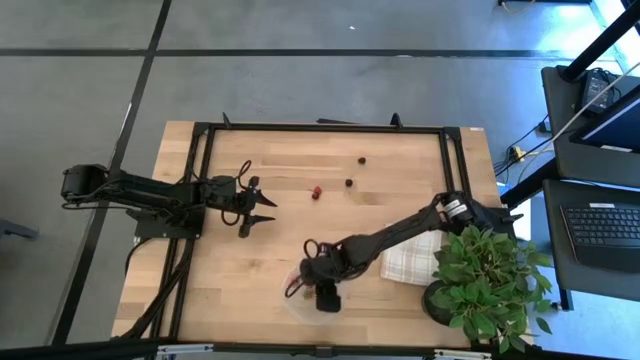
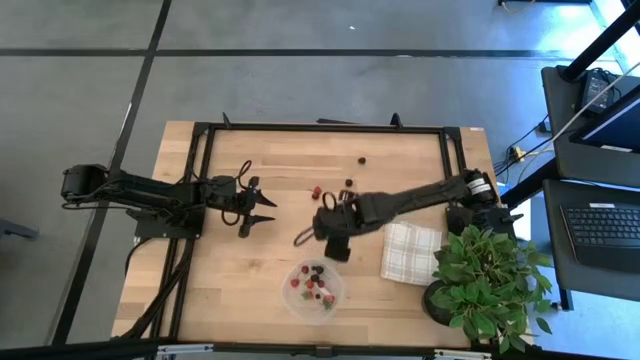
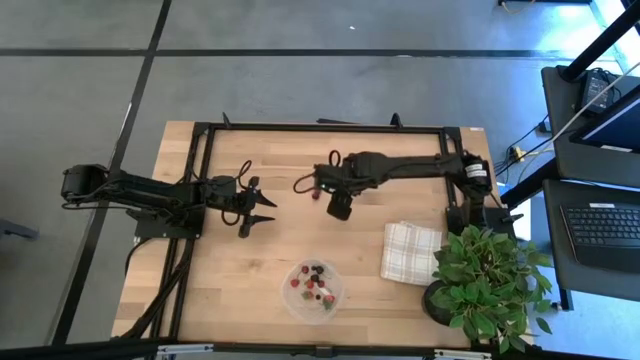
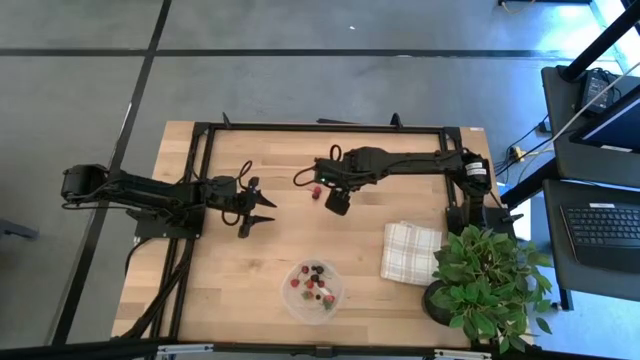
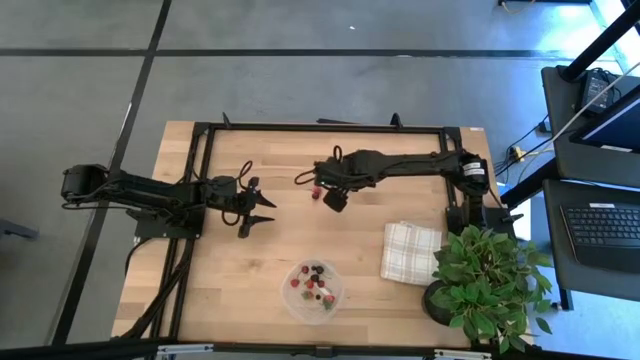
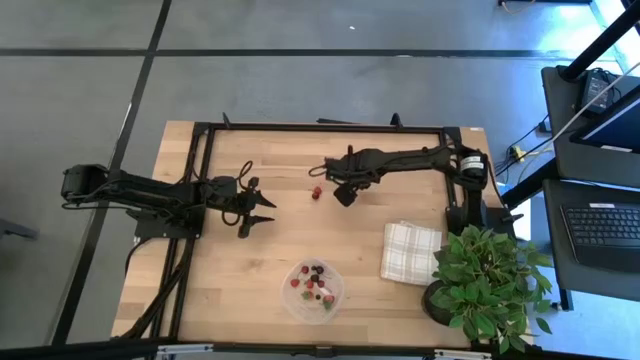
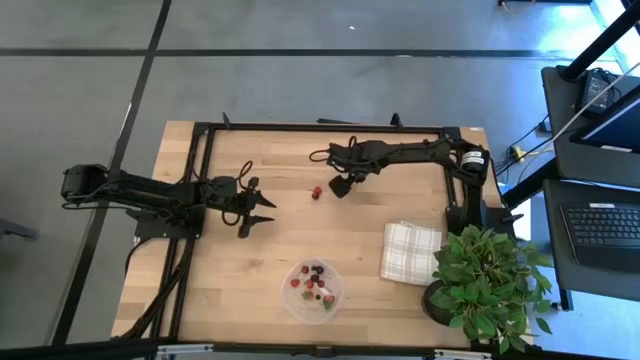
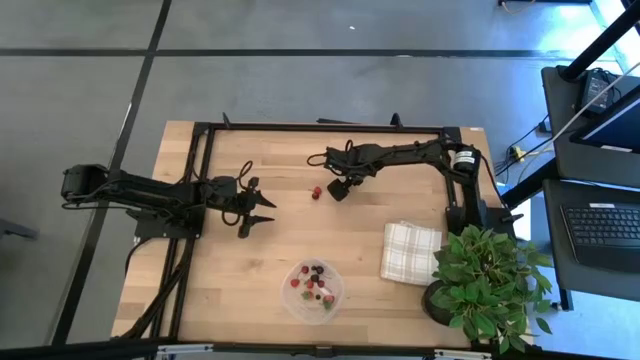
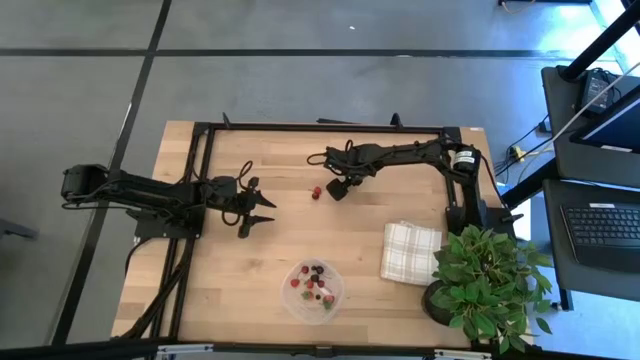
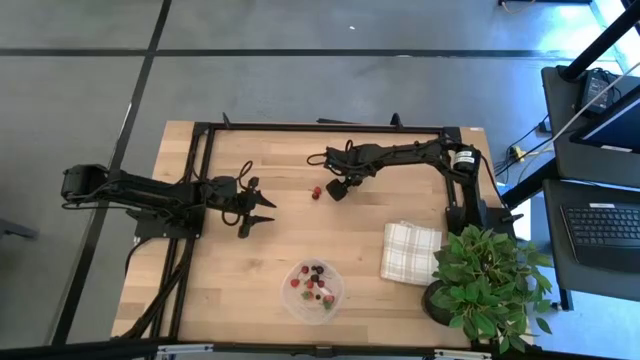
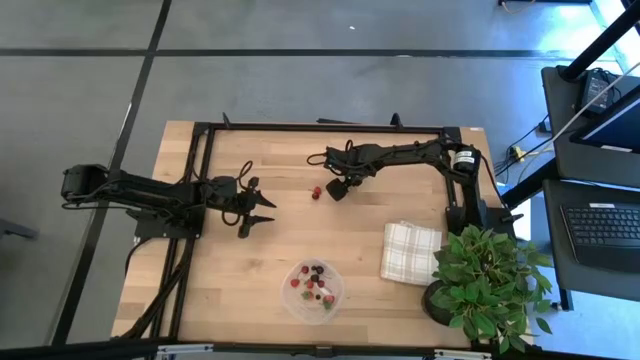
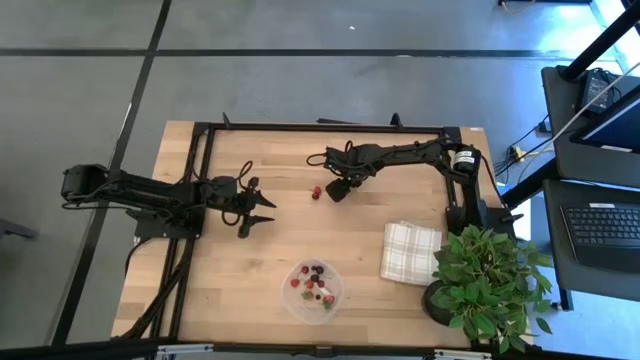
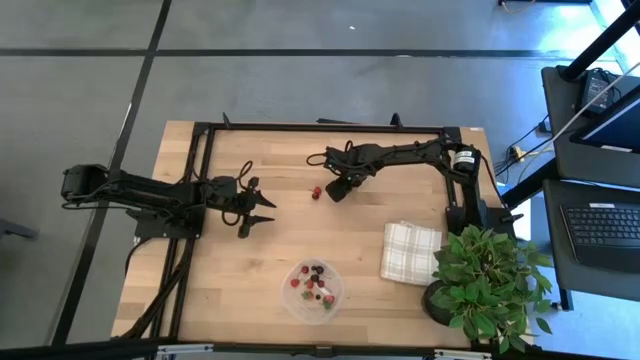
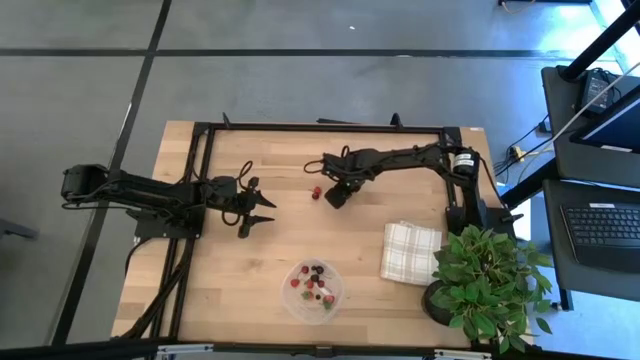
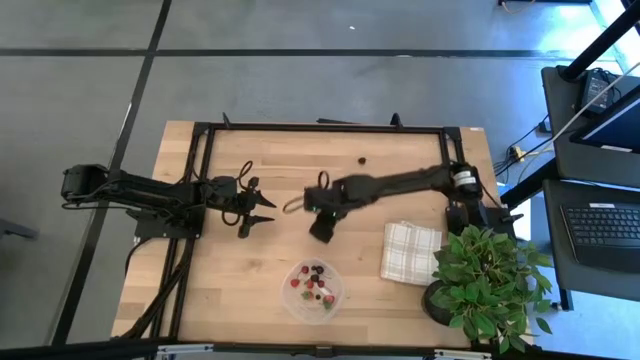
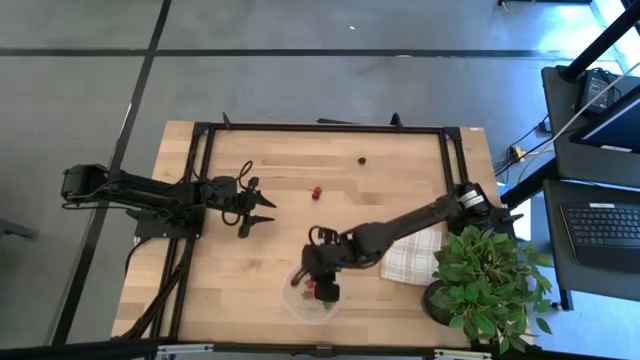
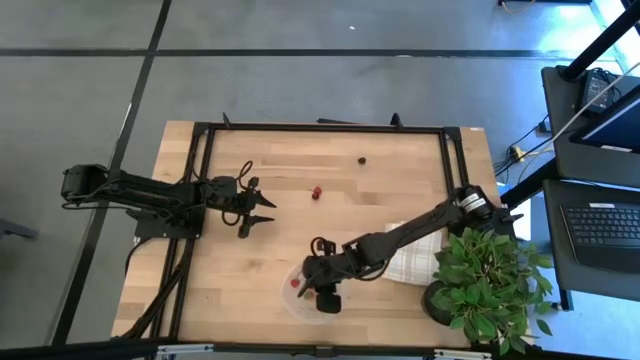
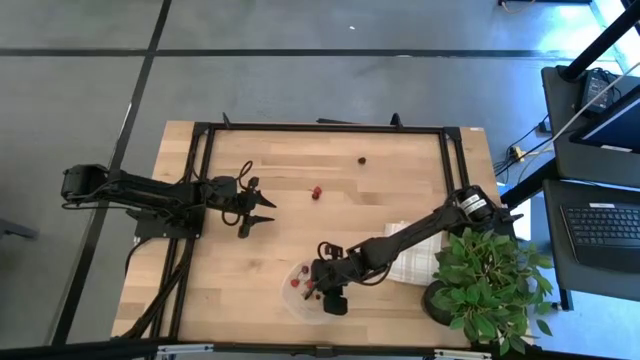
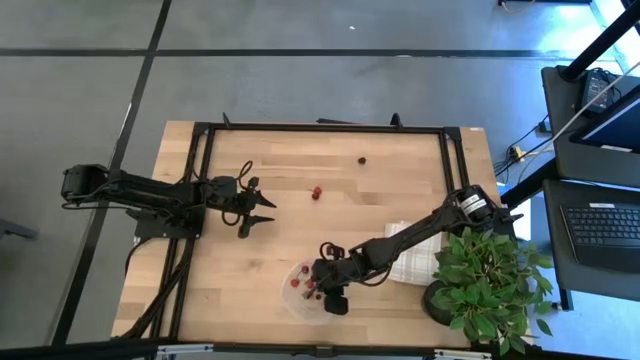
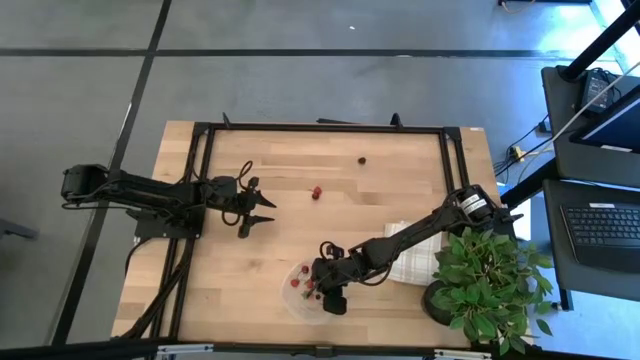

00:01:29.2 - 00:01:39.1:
Task: Pick and placing Produce into tupperware
Put the black cherry in the bottom transparent bin

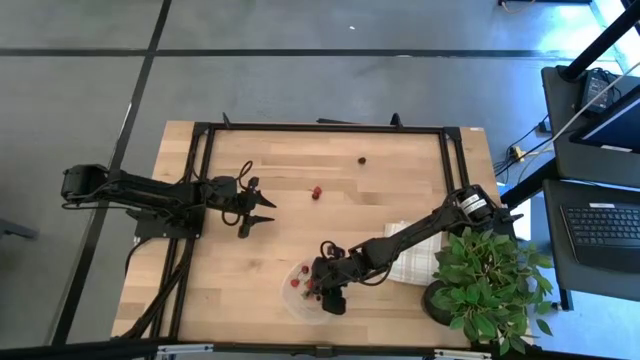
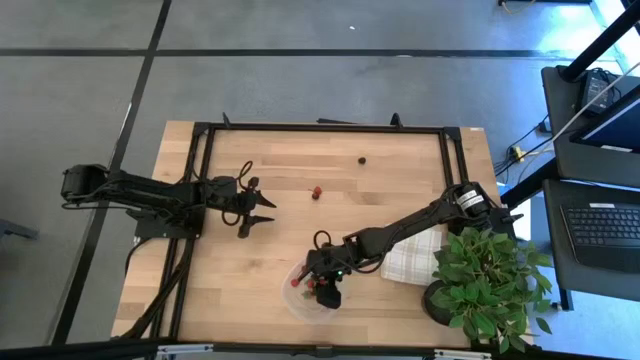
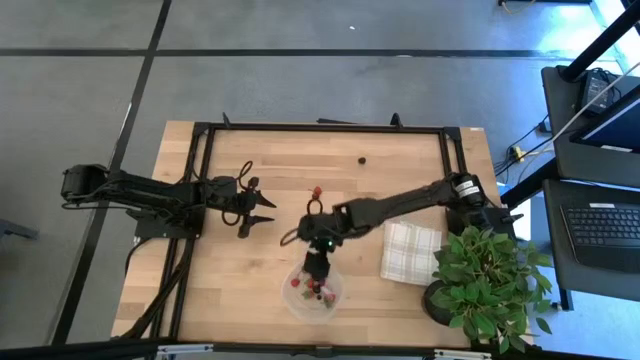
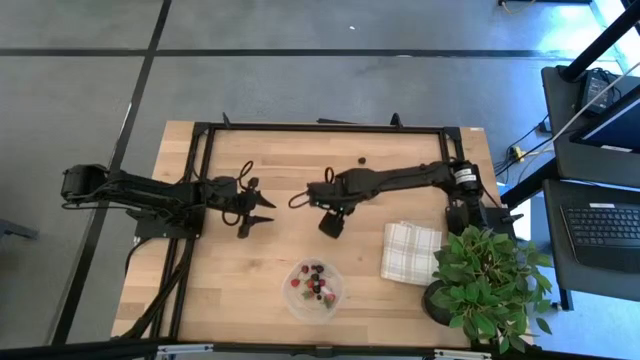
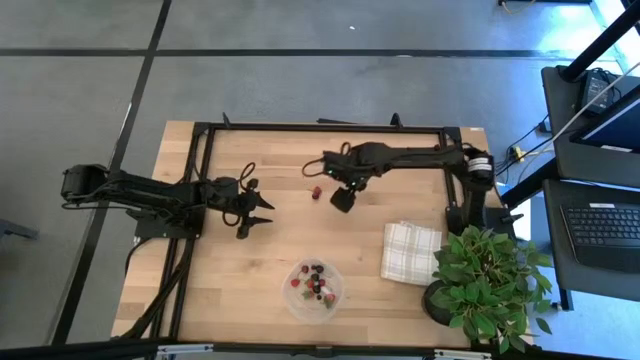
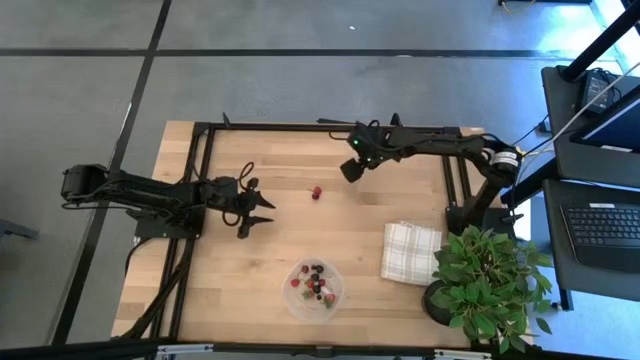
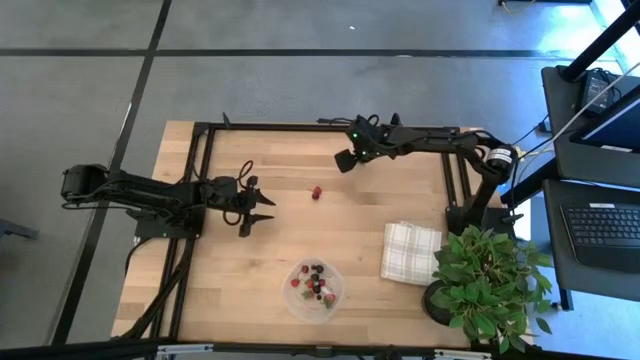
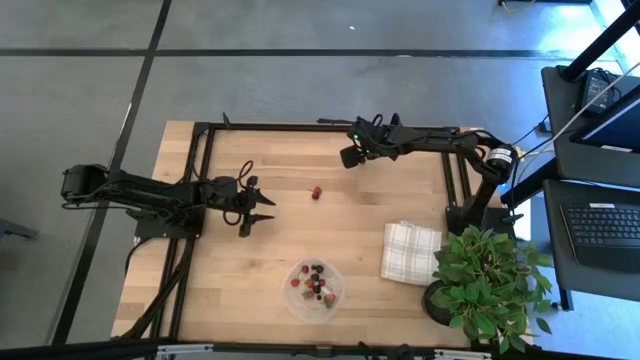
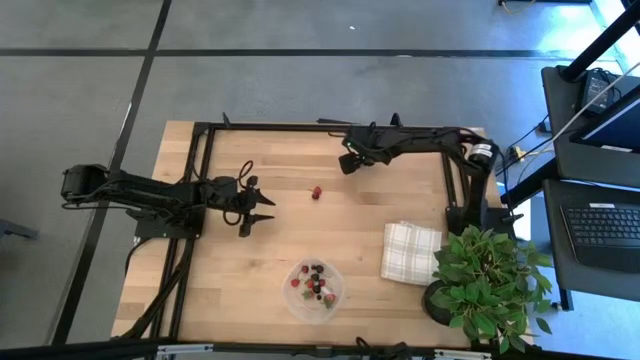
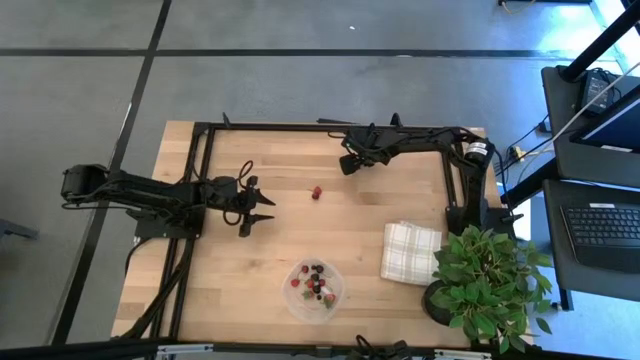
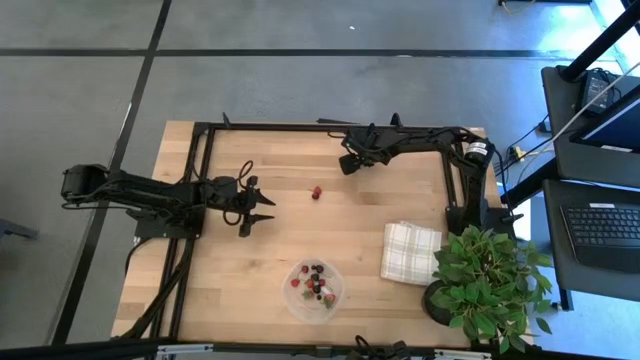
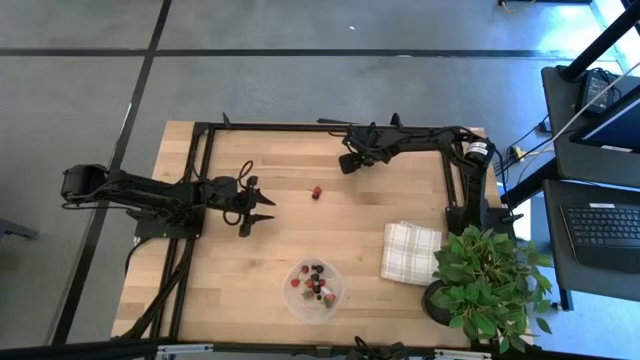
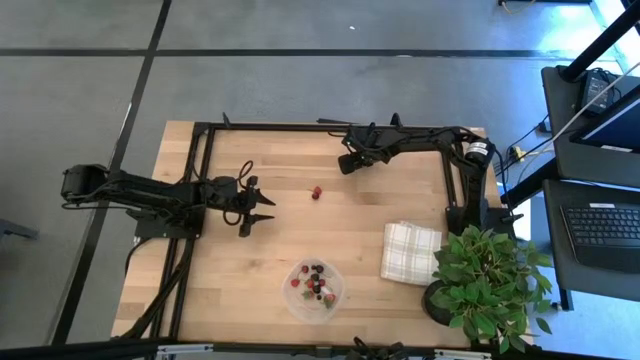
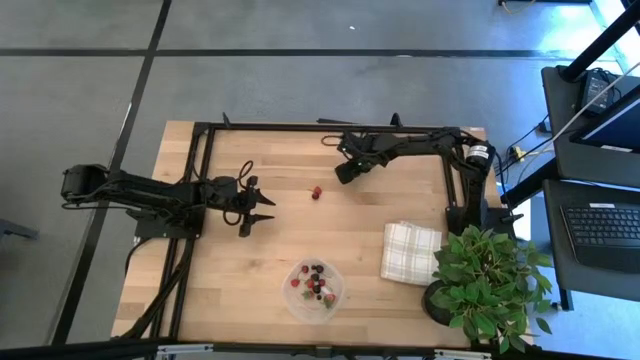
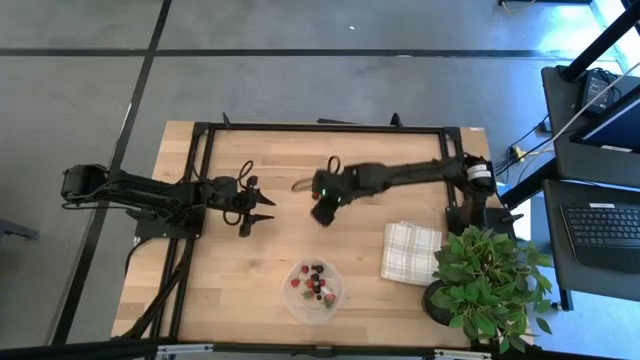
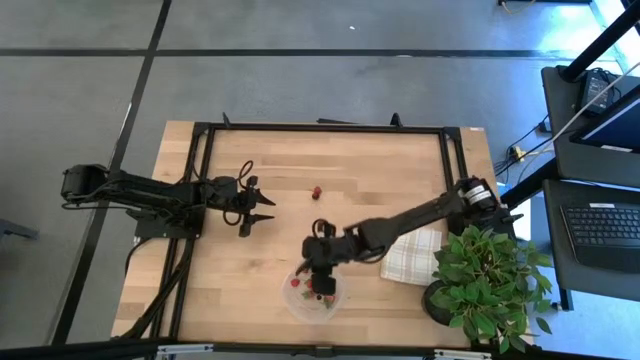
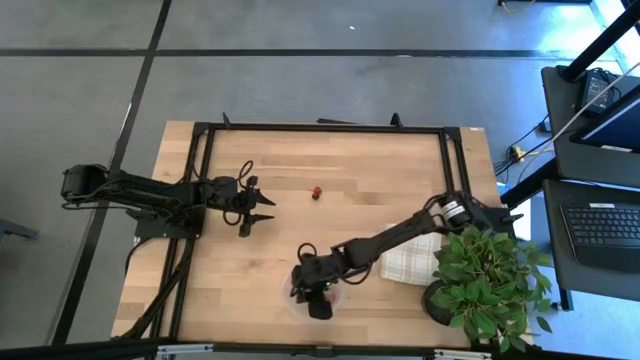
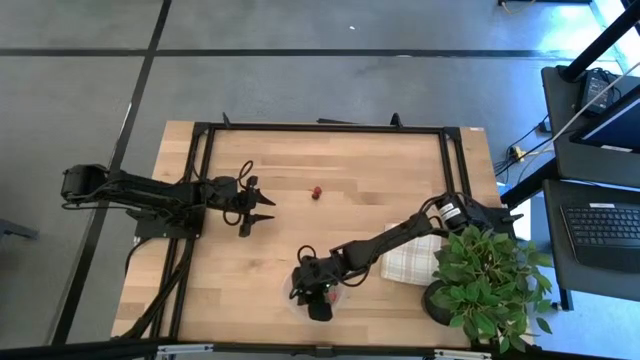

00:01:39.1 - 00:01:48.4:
Put the blackberry in the bottom transparent bin

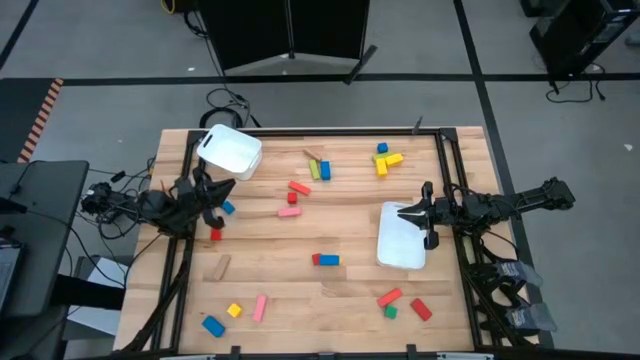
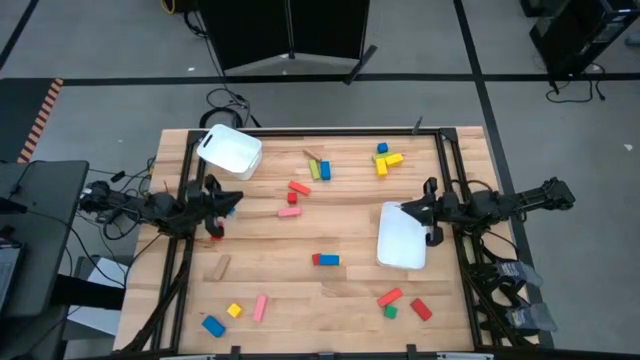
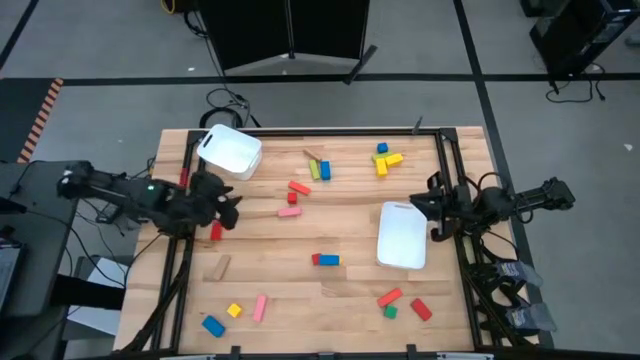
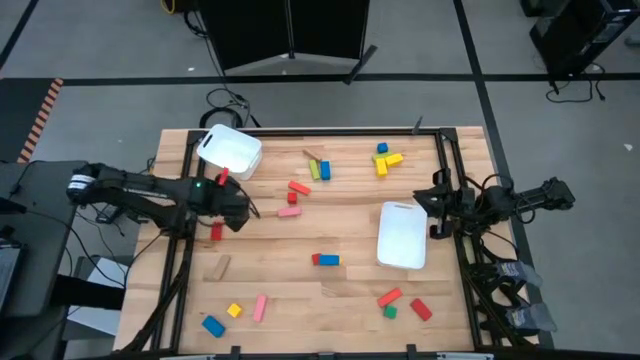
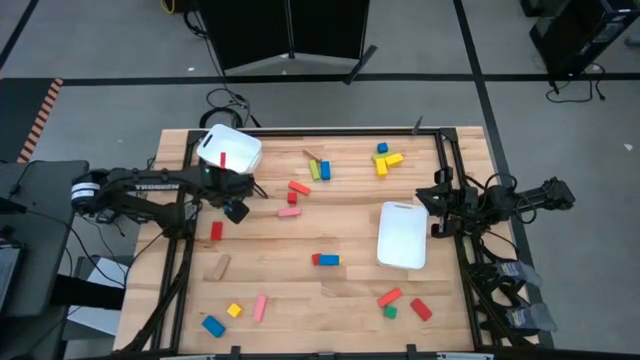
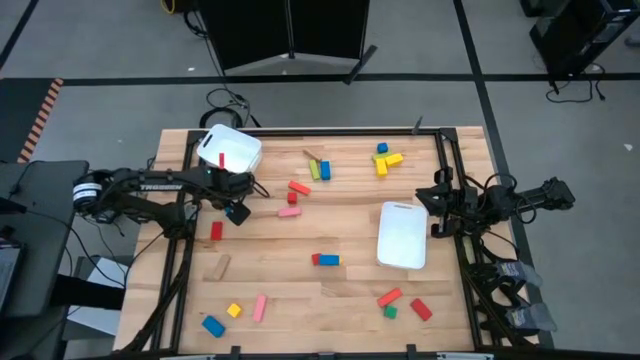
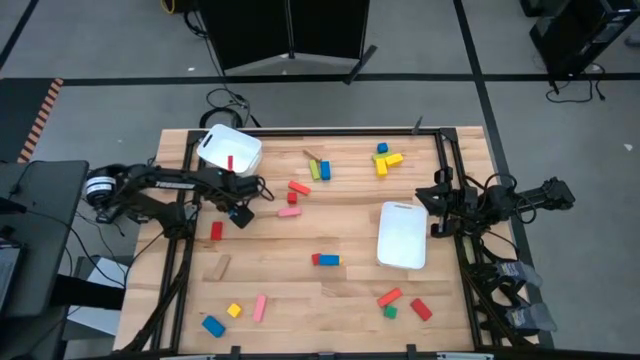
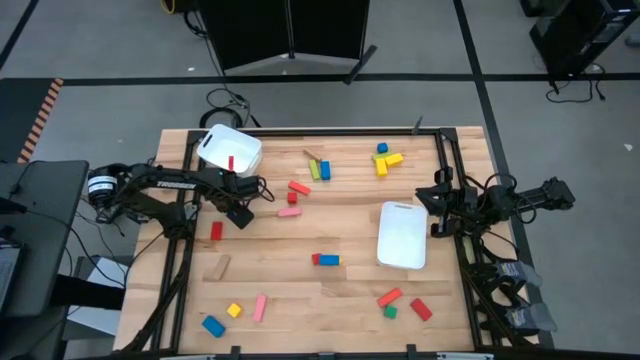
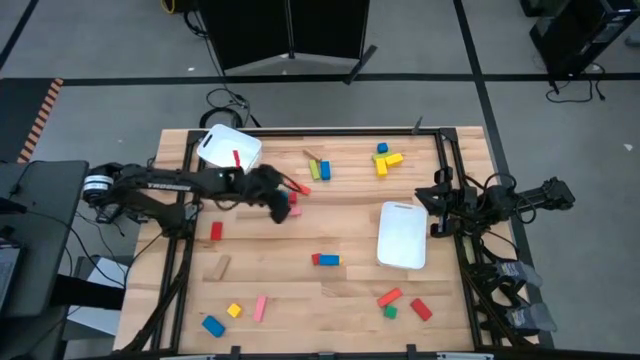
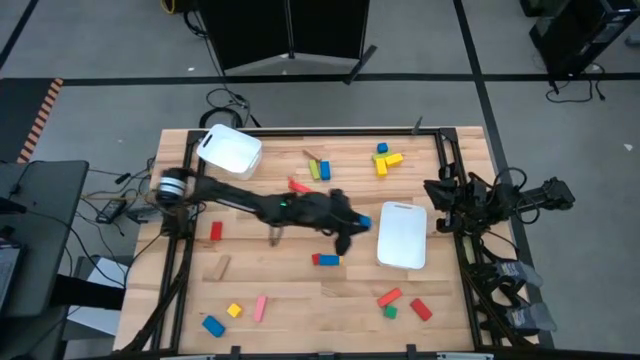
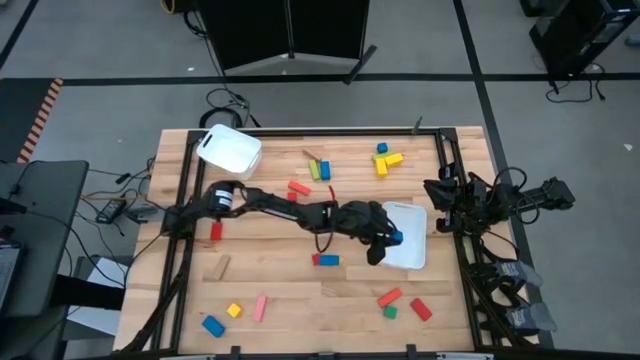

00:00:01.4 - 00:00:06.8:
Task: Sort blocks by size
Put the bottom blue cube block into the bottom white bin
